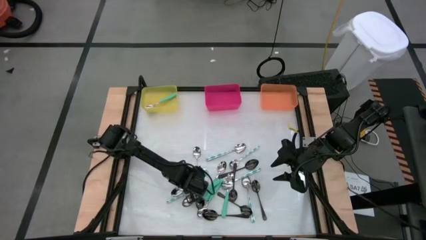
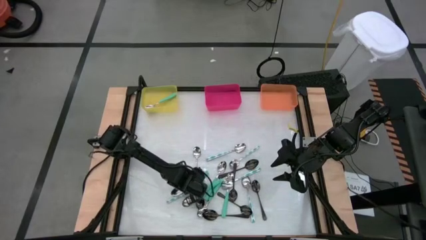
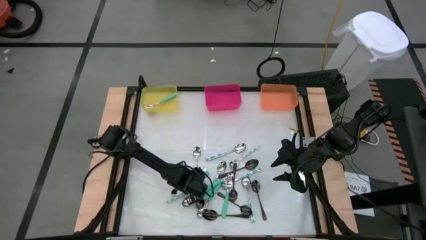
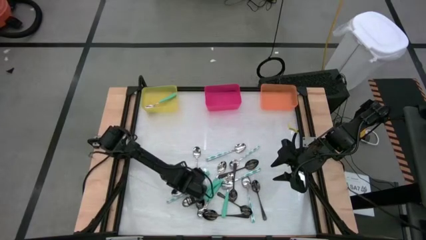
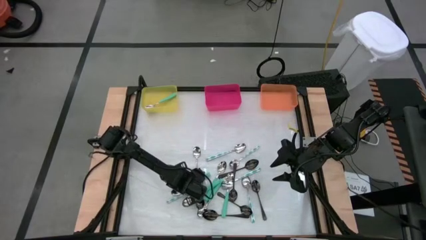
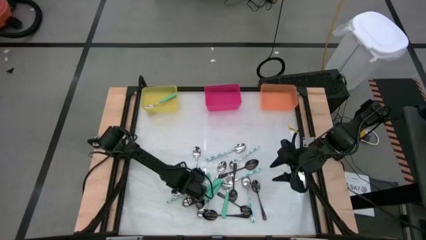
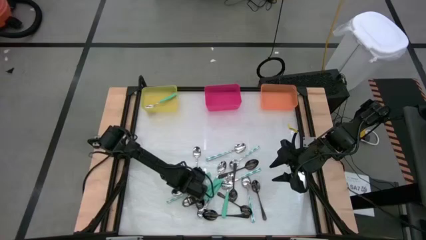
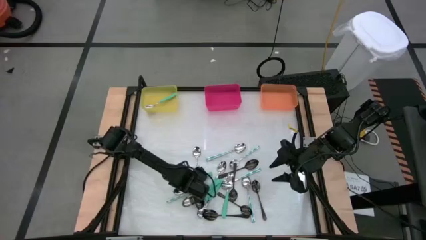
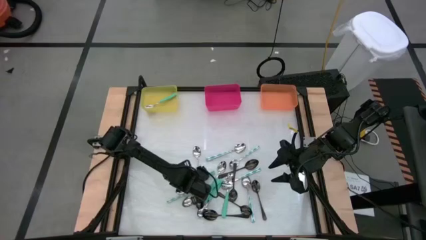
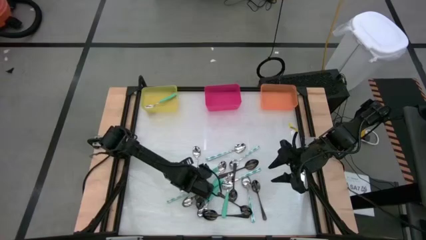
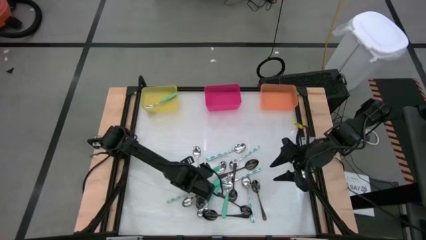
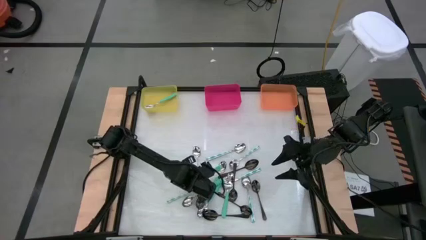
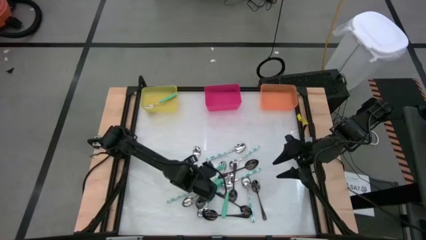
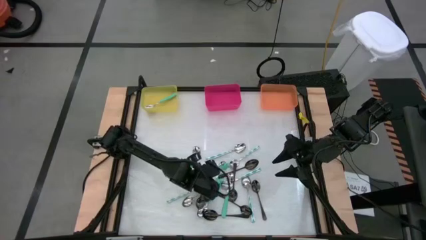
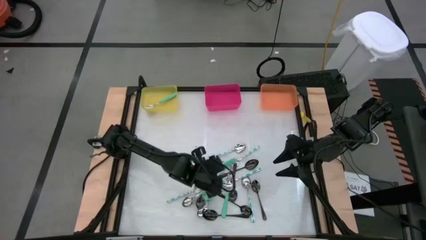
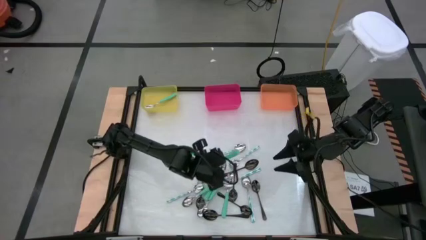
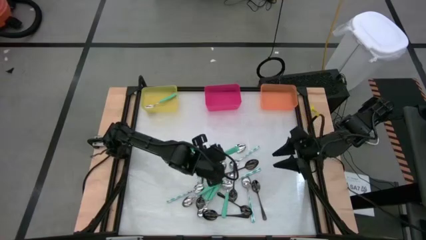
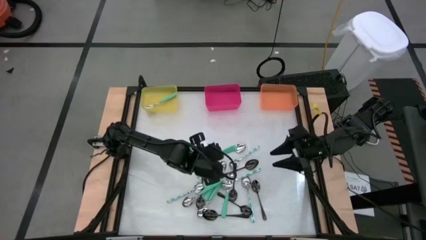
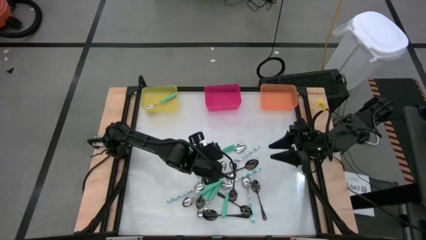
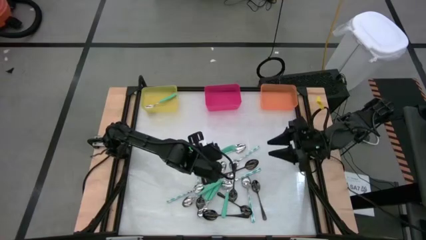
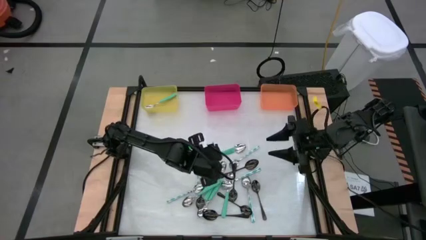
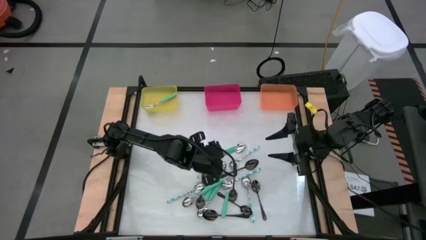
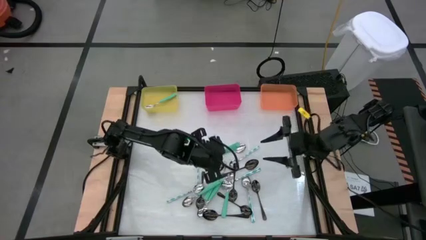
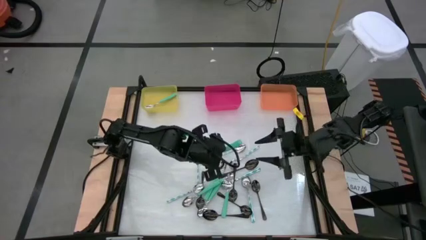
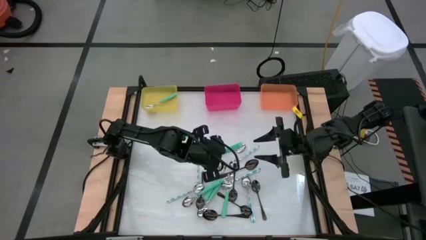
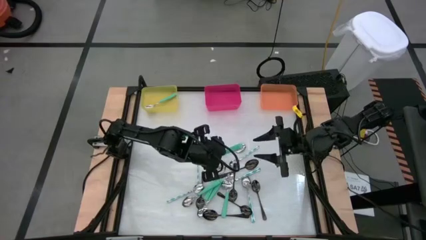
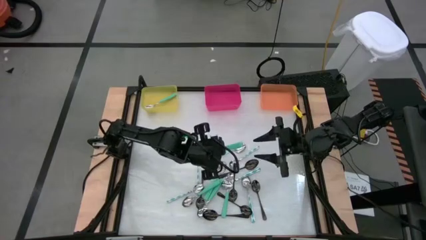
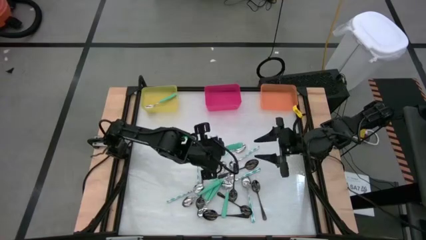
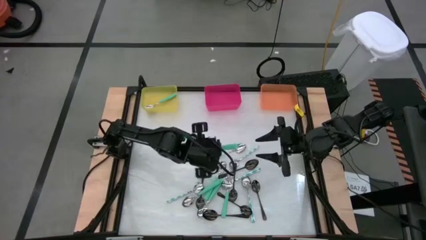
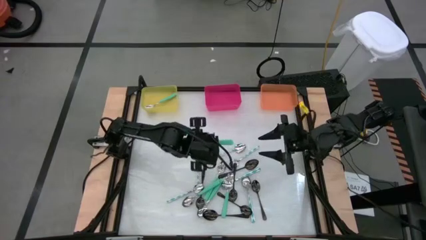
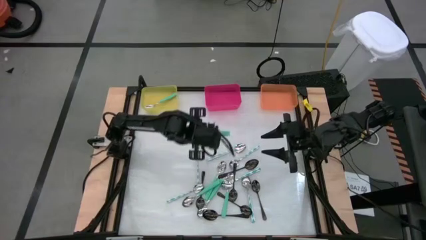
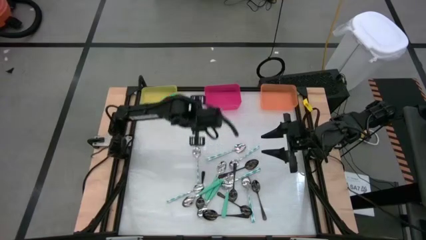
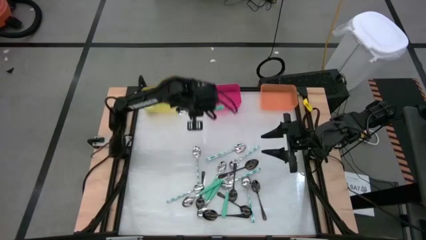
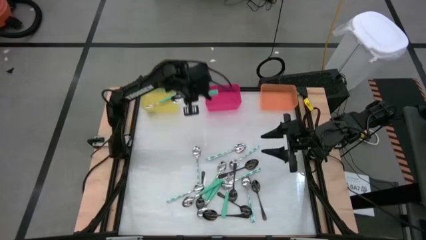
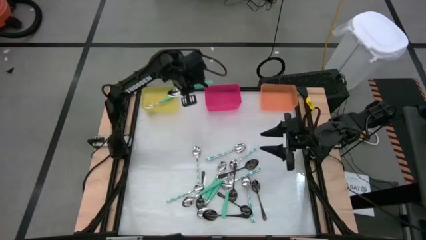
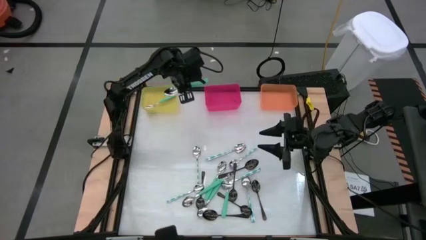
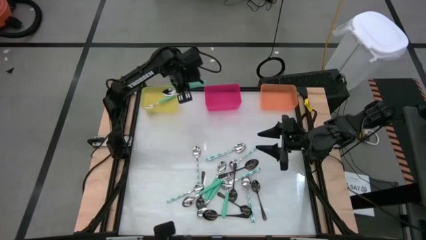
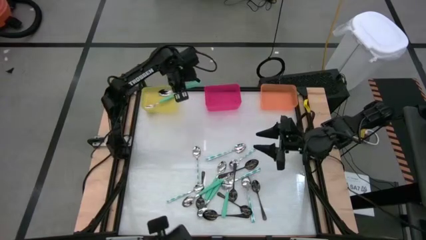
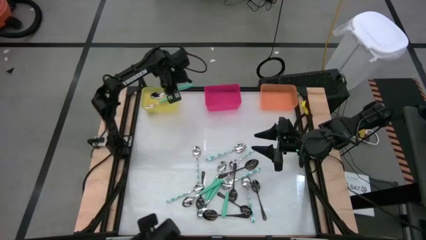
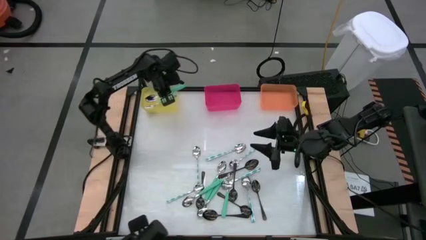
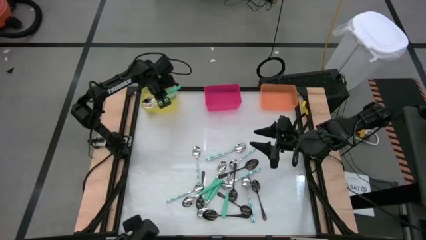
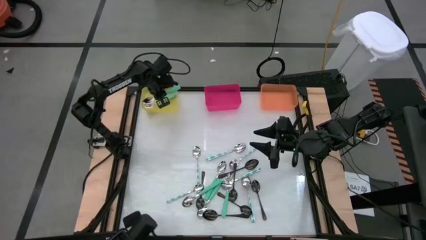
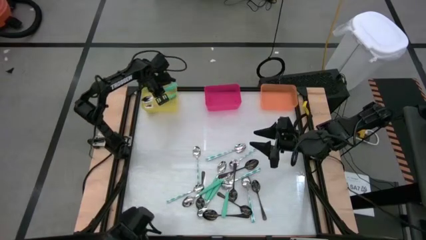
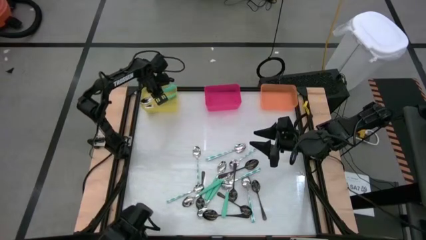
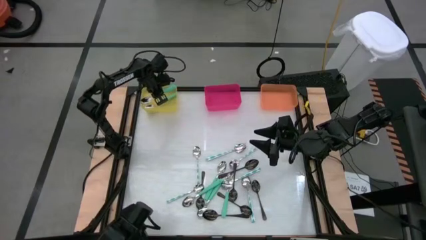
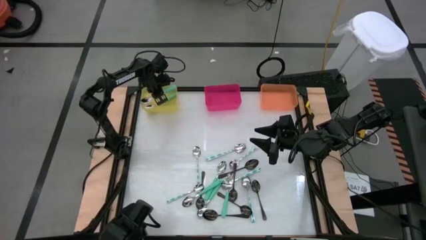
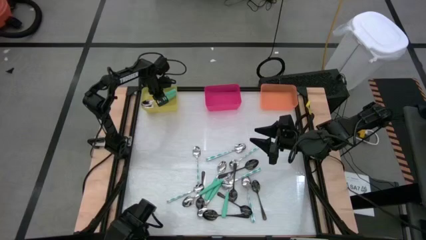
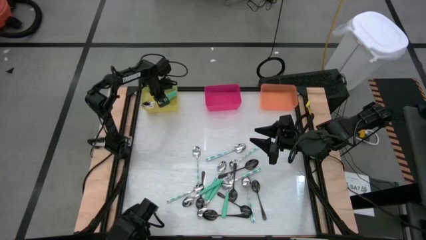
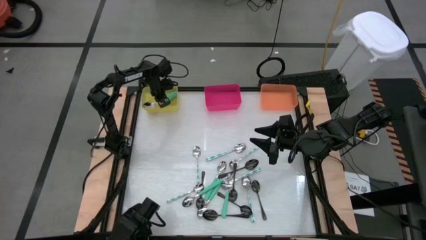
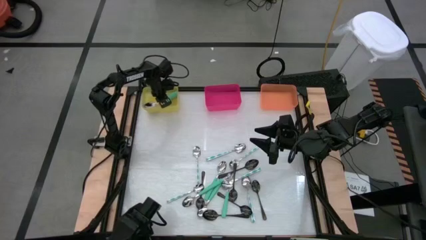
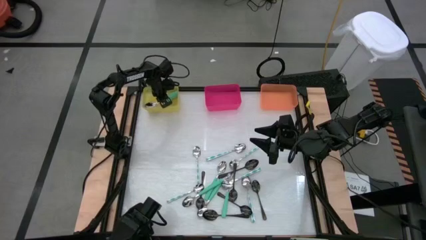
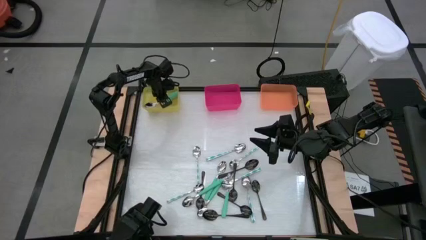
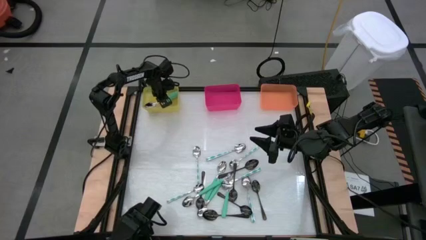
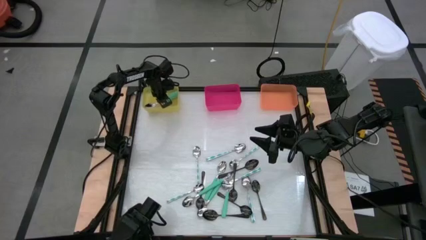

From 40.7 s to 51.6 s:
Task: Sort silverware by color (type)
Put the light green spoon into the yellow bin
